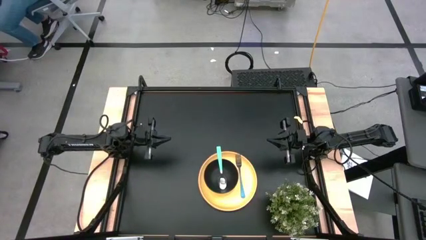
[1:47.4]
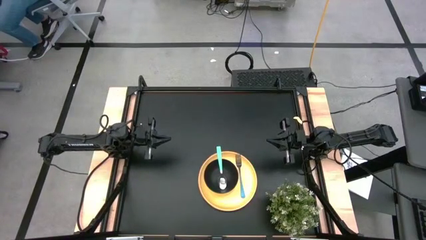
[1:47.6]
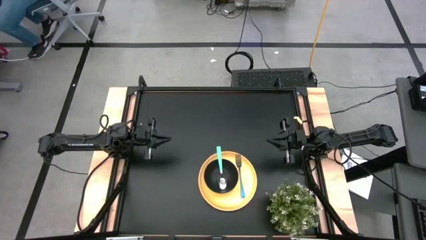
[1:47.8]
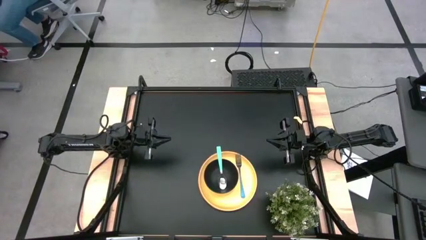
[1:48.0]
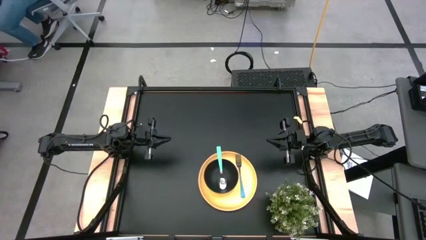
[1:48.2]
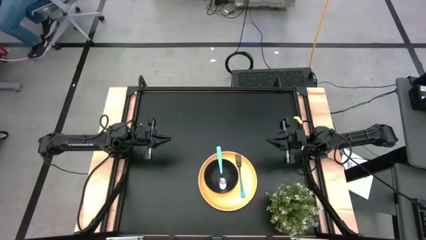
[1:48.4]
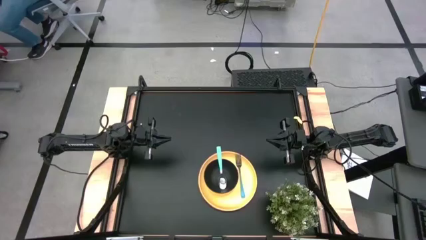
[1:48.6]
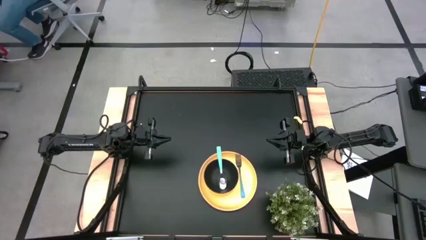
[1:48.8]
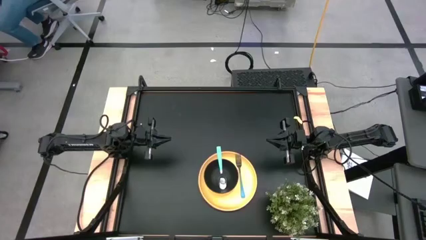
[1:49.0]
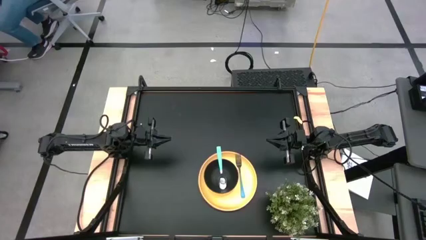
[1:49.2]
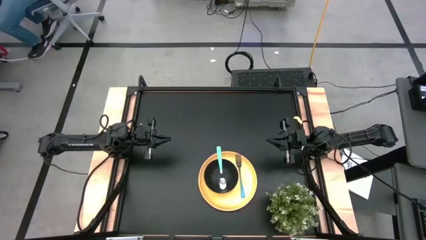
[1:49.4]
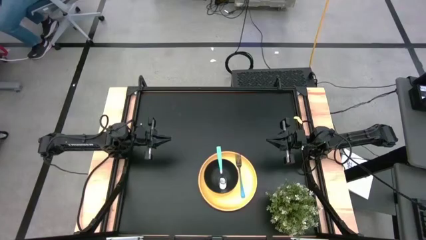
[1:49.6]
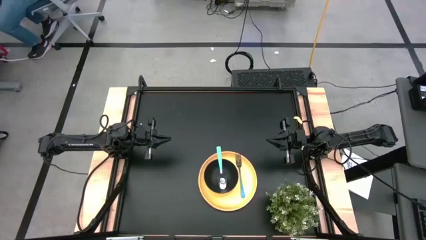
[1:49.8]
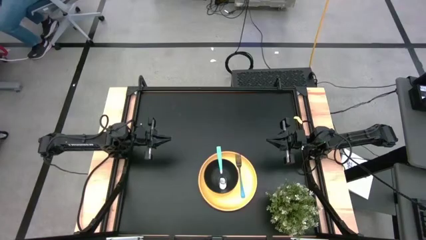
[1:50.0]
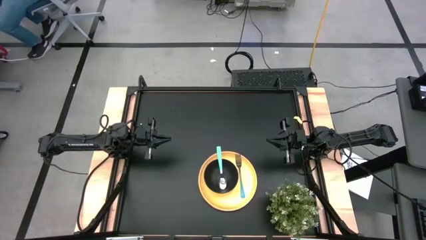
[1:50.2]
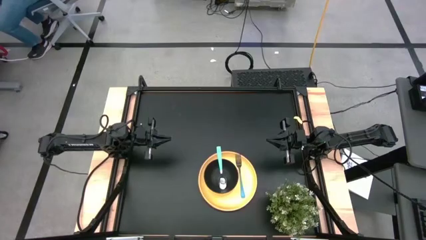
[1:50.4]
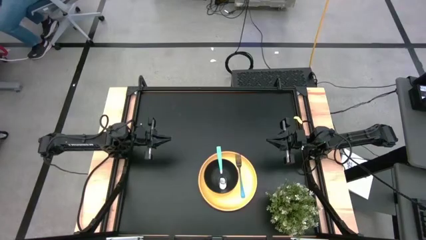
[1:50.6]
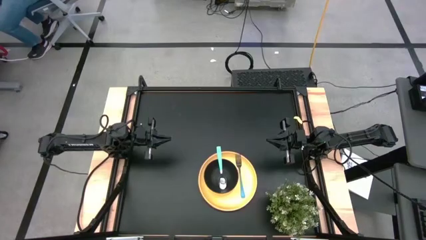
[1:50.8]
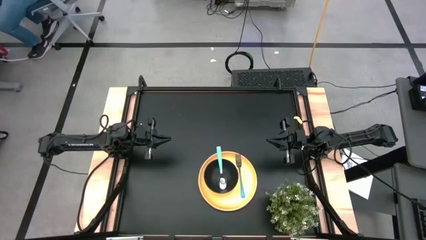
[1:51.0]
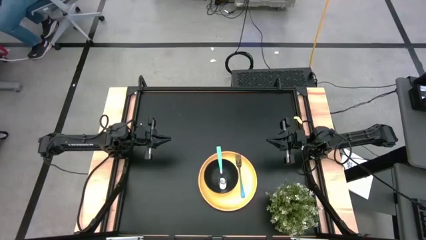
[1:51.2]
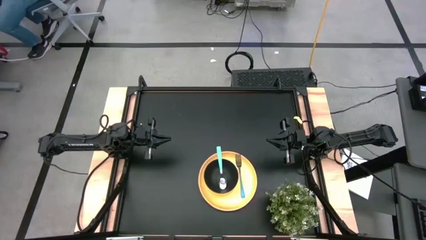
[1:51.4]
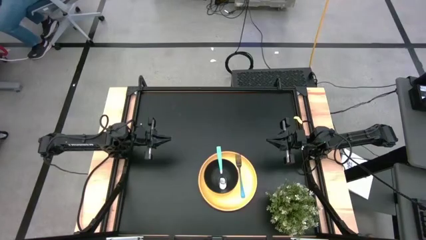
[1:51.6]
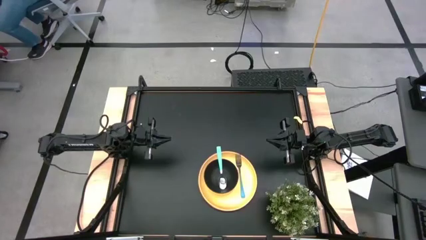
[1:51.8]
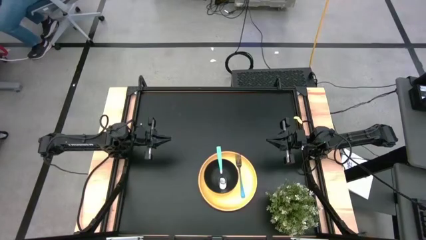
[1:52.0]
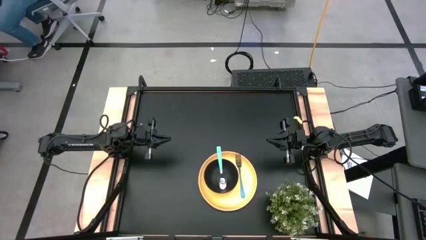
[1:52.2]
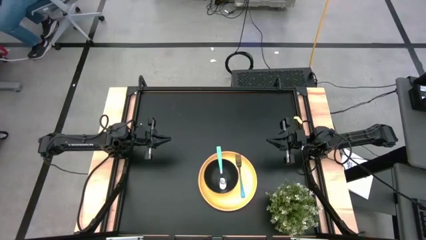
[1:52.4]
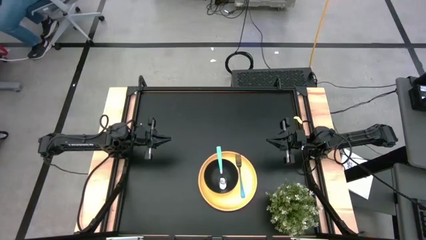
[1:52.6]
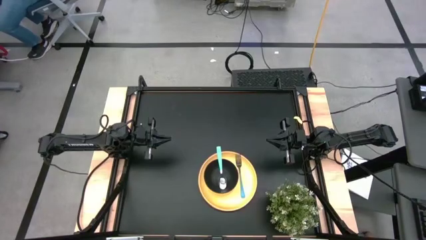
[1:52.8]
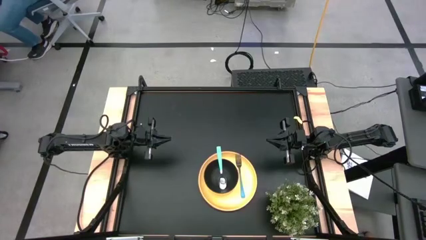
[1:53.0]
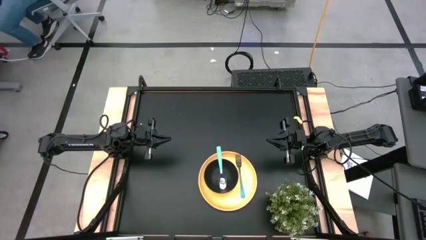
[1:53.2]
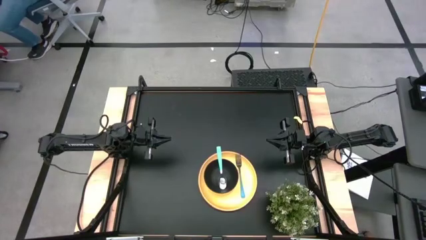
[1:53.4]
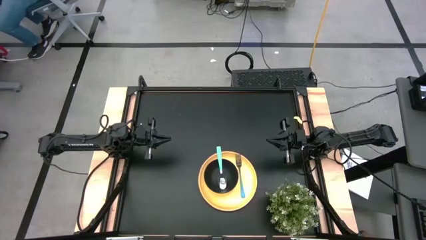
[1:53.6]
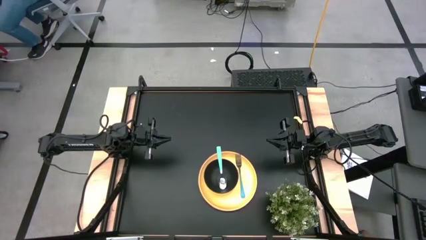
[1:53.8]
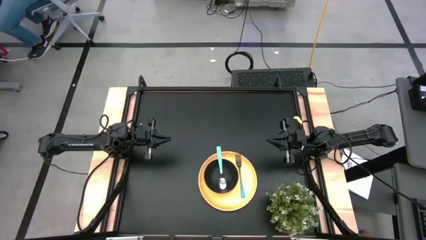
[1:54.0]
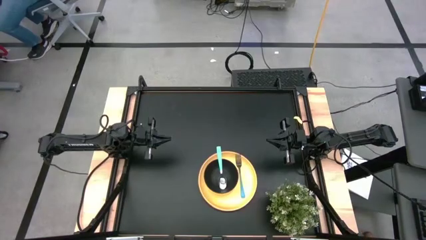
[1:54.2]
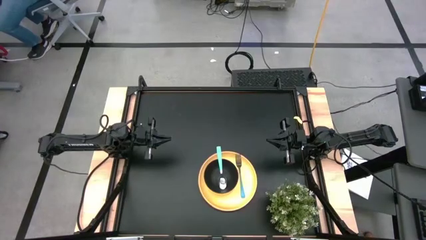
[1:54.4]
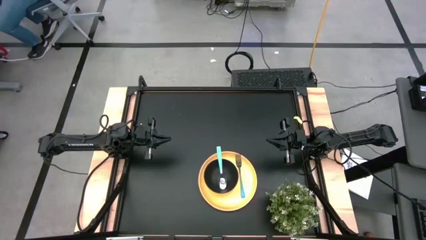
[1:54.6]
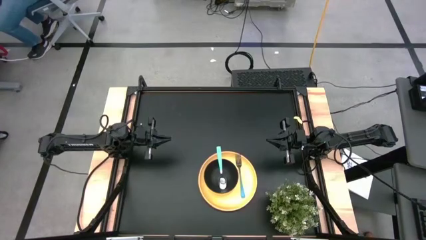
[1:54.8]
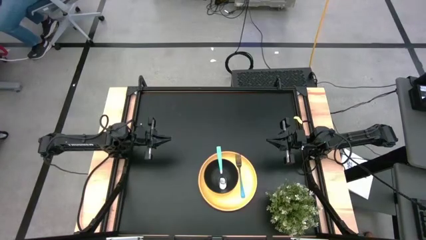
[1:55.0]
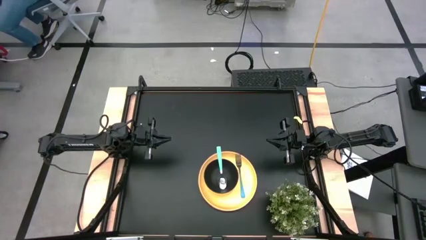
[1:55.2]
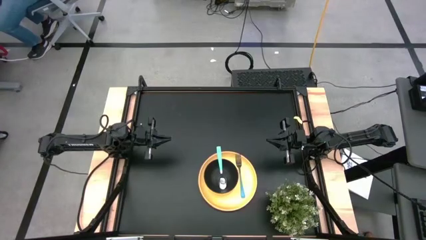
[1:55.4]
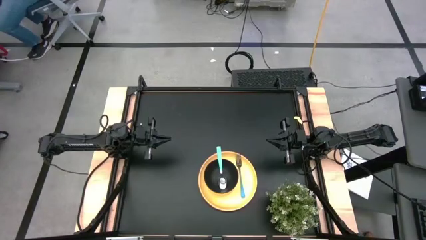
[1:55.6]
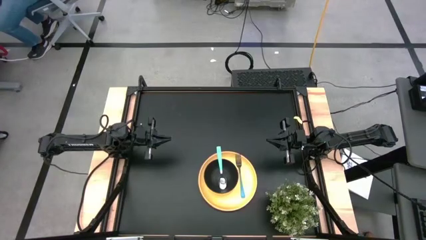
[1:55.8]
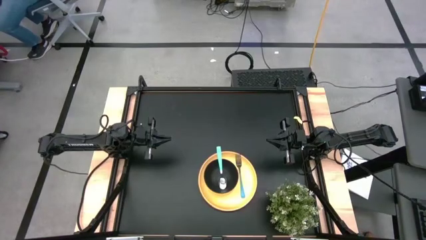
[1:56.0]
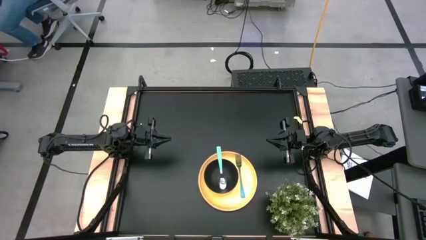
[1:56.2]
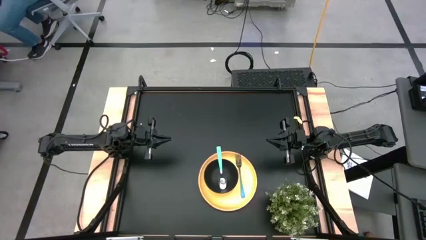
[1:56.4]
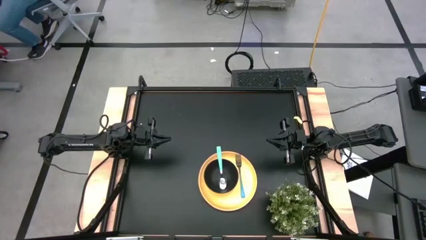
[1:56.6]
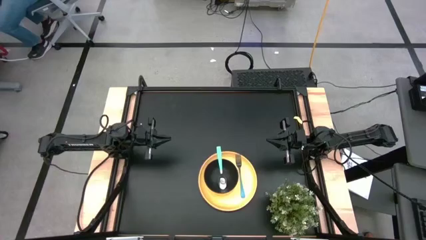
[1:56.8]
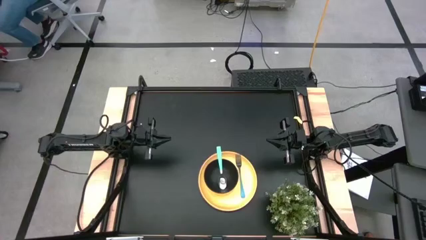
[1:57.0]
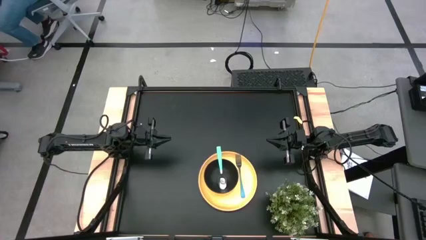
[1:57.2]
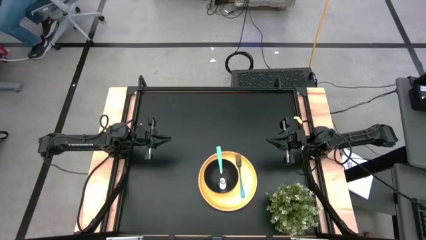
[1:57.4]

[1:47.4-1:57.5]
Task: Pick and place plate/cup/fork/spoon on tray
Return to Home Position
